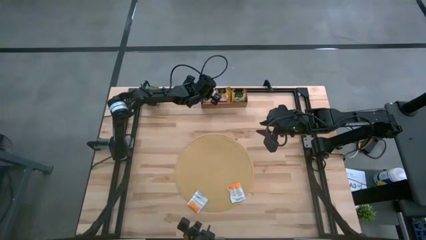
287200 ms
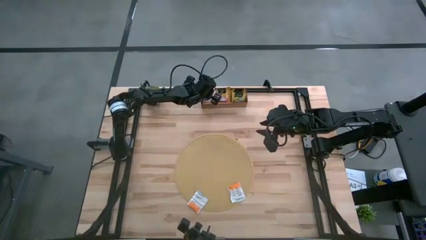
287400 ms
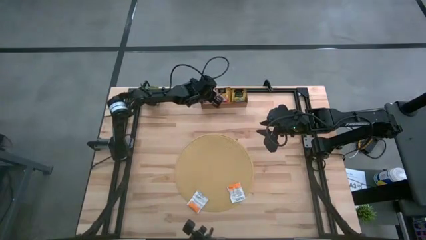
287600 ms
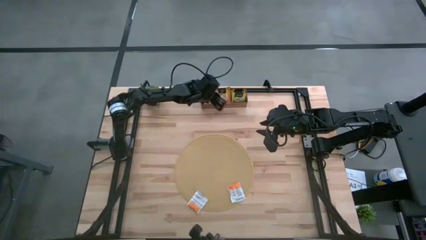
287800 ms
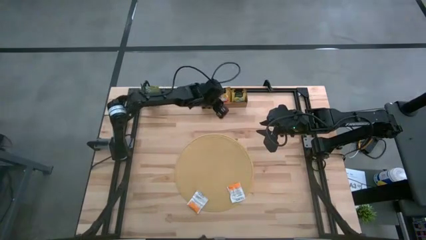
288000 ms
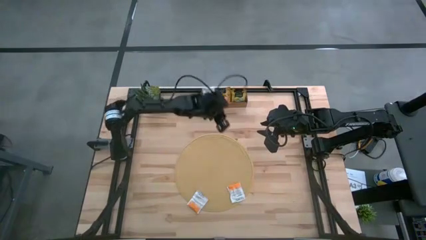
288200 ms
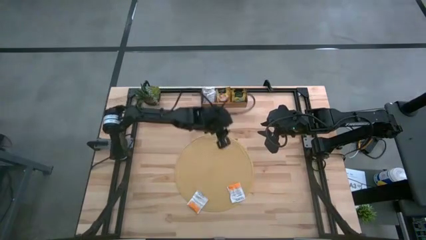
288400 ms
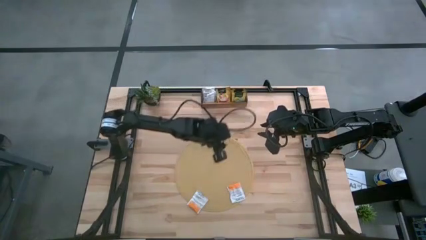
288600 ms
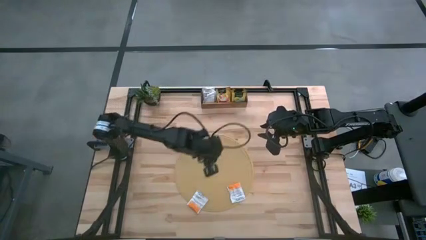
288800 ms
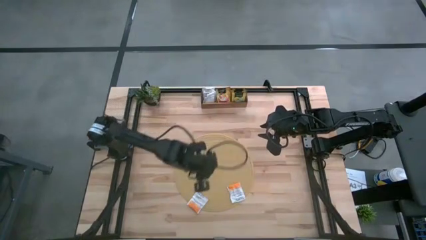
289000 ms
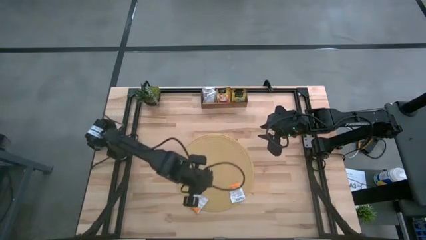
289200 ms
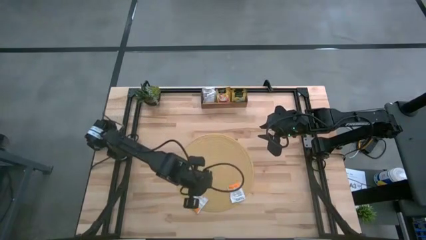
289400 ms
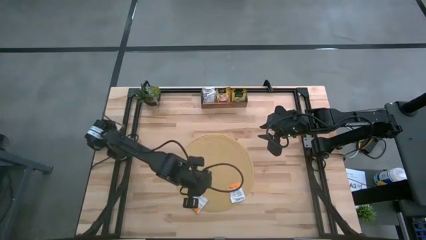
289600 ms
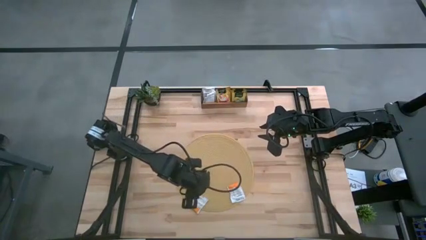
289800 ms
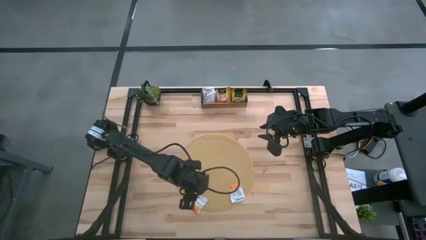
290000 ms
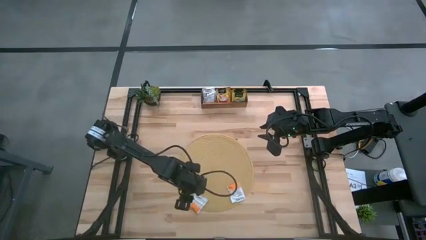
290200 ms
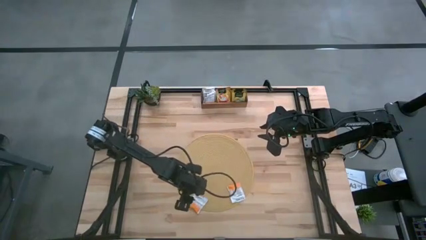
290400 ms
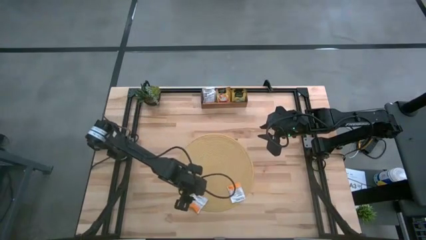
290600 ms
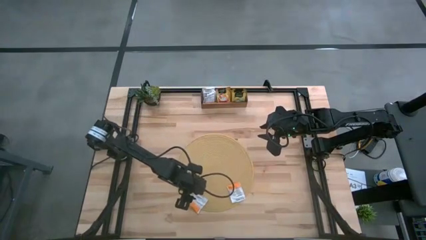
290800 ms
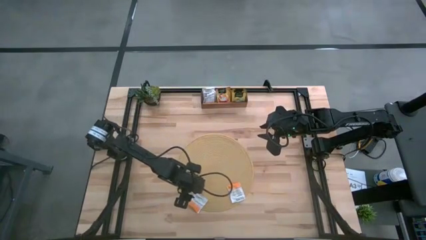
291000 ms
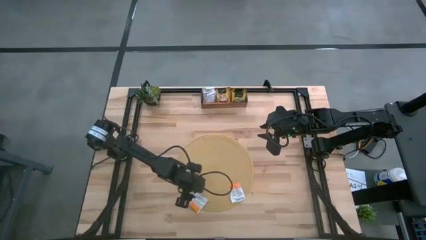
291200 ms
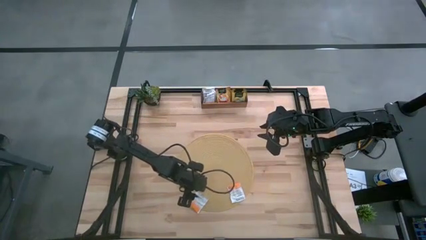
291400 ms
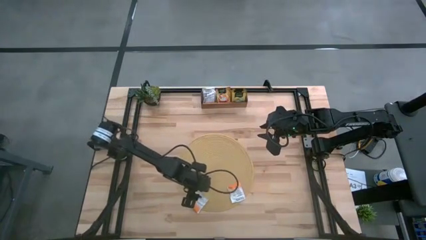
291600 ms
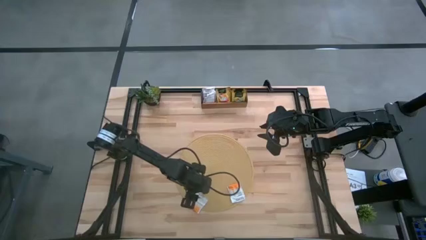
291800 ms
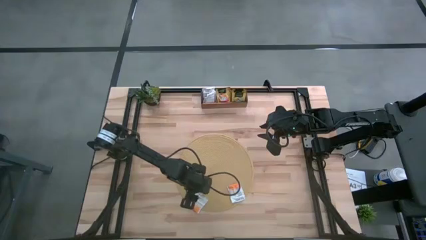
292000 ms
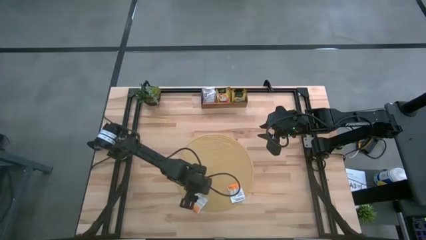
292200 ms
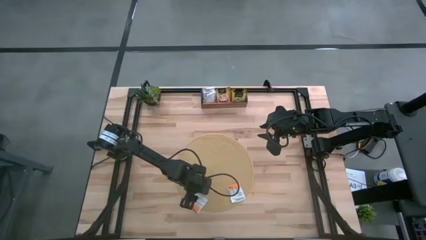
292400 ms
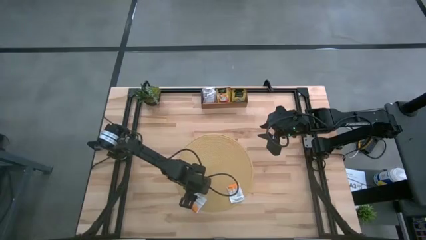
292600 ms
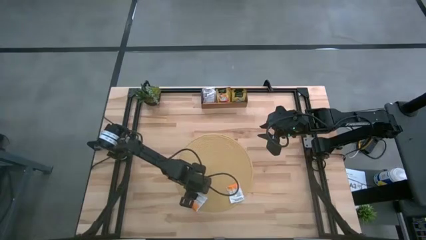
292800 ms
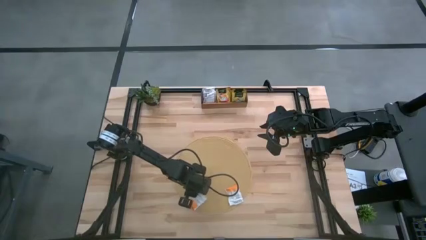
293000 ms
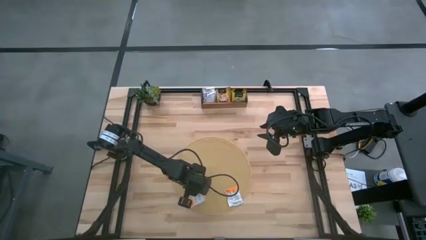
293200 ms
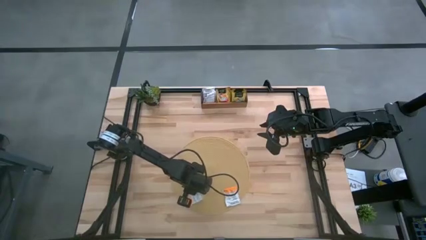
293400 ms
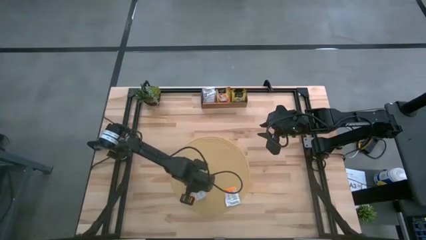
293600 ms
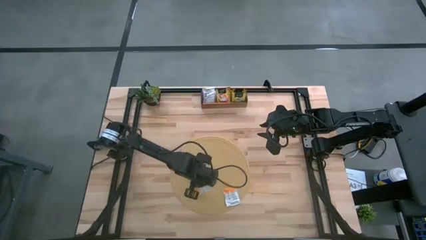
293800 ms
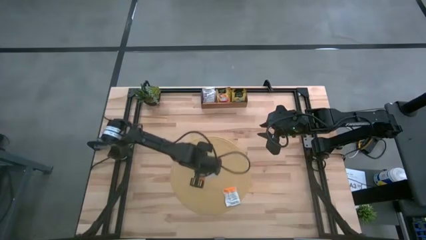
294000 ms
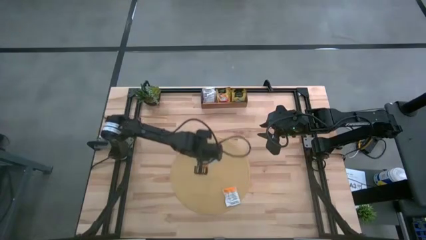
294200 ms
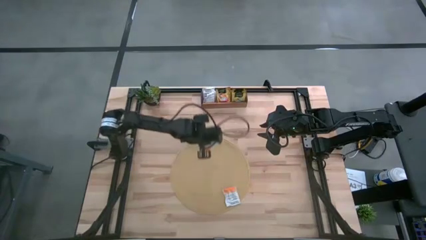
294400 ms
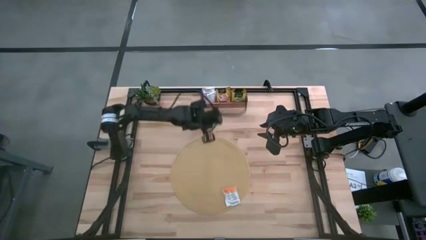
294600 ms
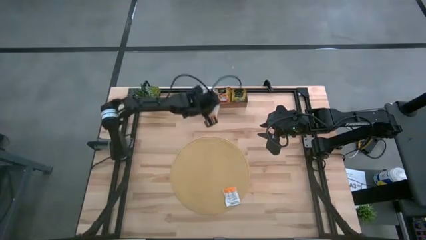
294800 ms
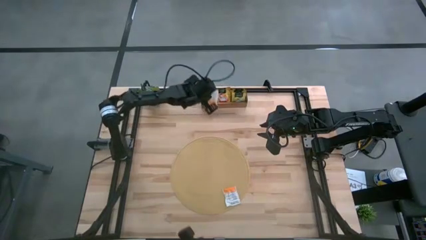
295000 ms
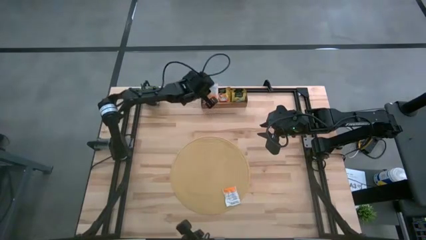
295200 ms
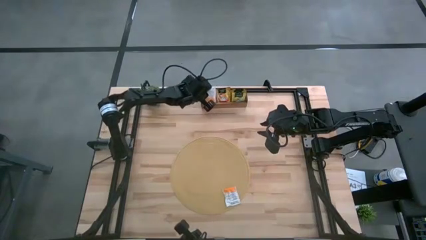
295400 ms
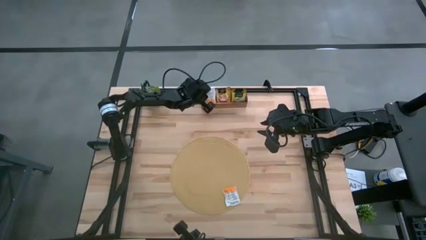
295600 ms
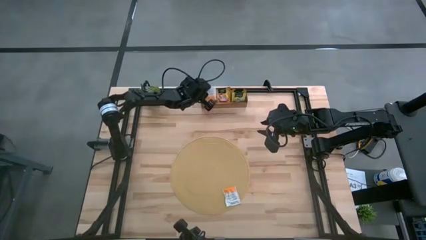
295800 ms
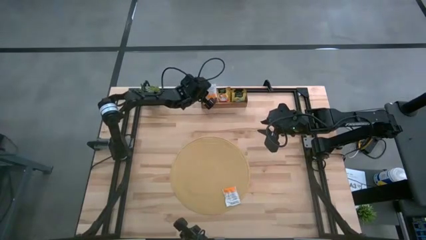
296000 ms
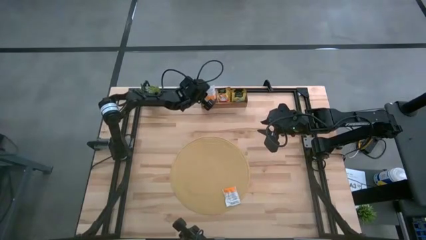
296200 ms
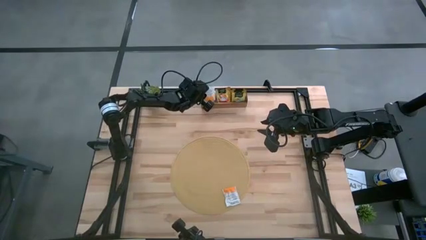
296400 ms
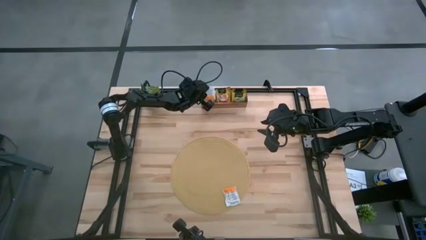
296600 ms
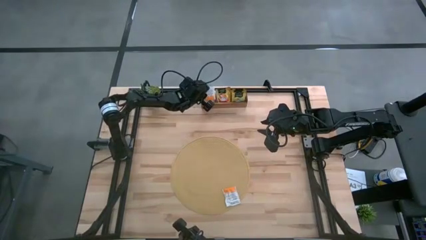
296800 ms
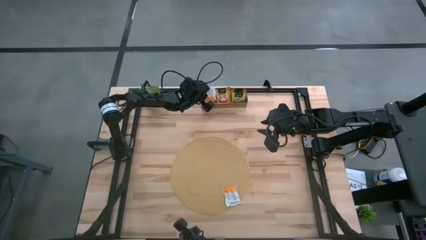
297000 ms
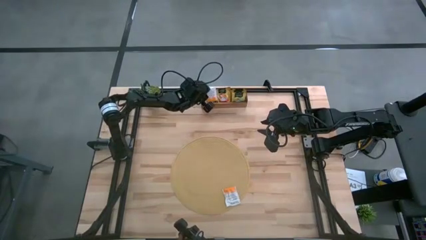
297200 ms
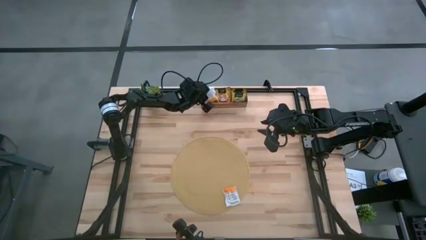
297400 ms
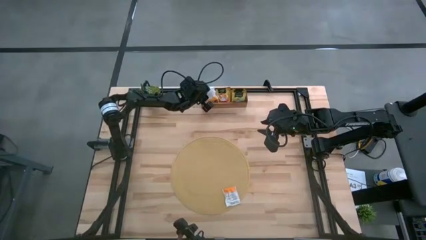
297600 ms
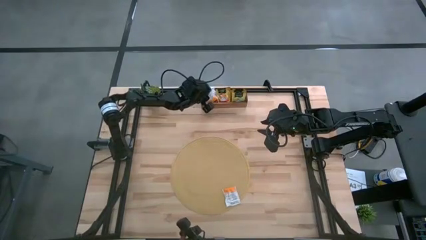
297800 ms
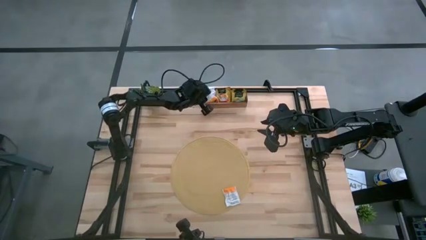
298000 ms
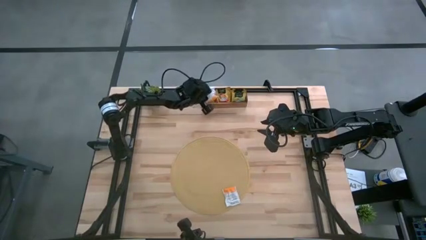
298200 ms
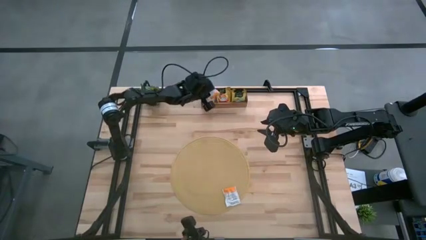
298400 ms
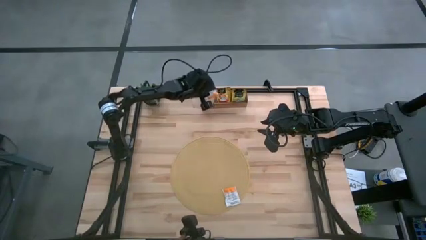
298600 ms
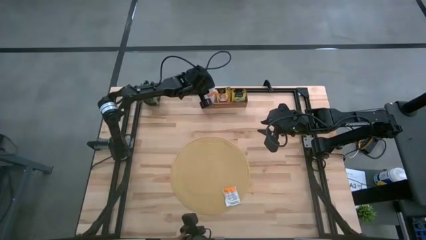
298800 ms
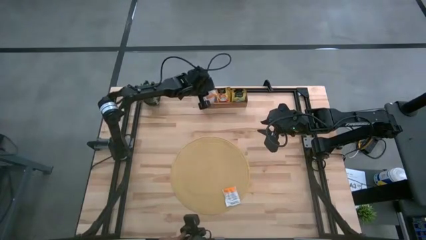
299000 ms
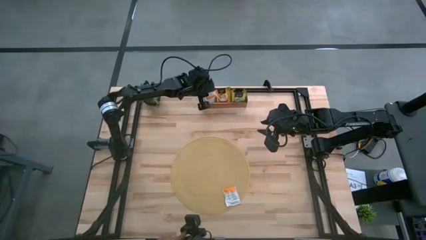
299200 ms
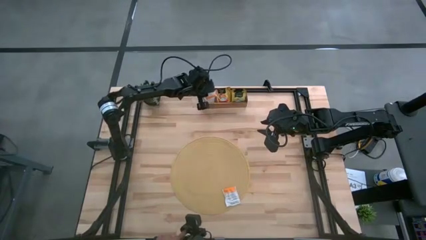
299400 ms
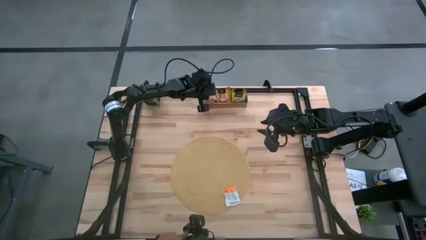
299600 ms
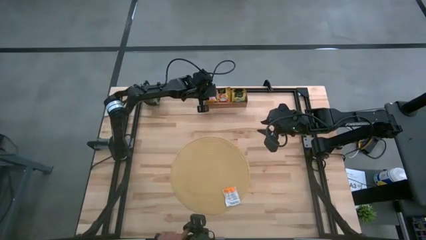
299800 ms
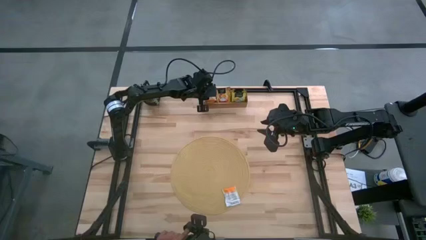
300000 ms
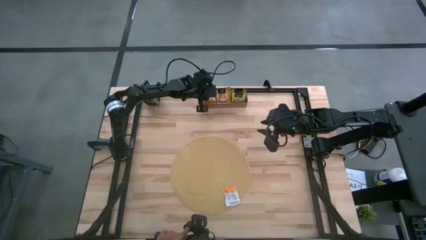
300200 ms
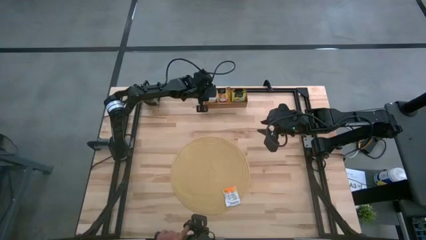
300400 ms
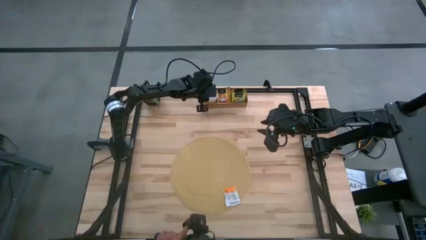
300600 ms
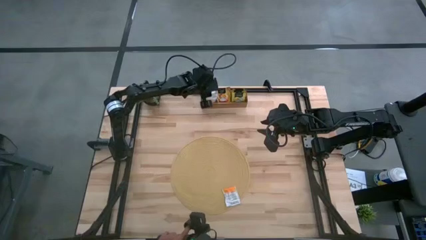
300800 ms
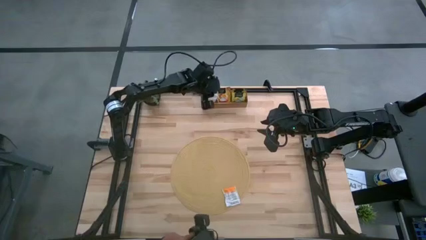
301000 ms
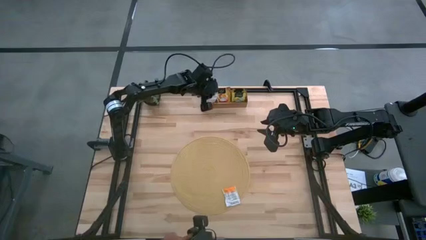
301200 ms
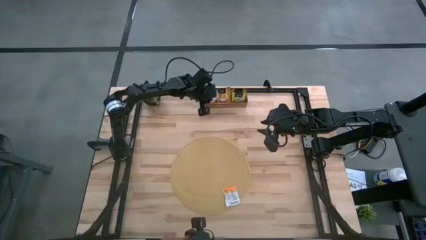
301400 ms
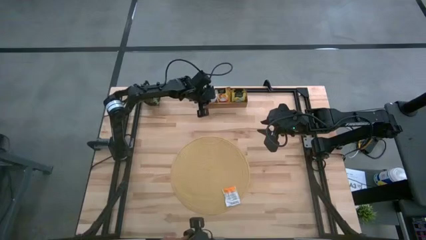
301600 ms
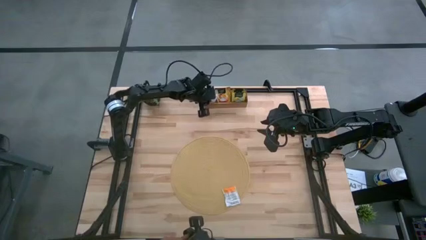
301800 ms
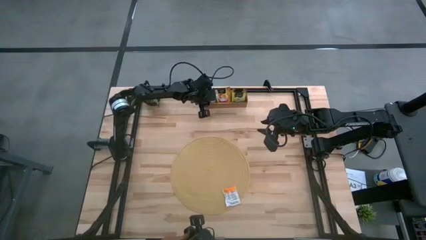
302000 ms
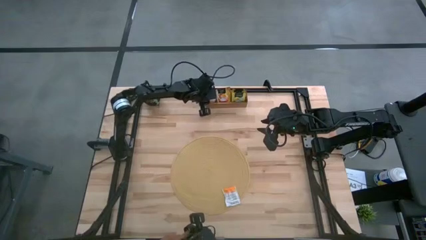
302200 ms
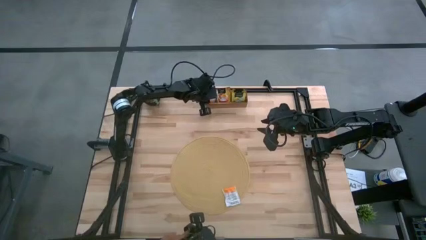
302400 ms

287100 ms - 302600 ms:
Task: Pick & Place Tea
Put the left orange tea bag into the left section of the wooden organizer
